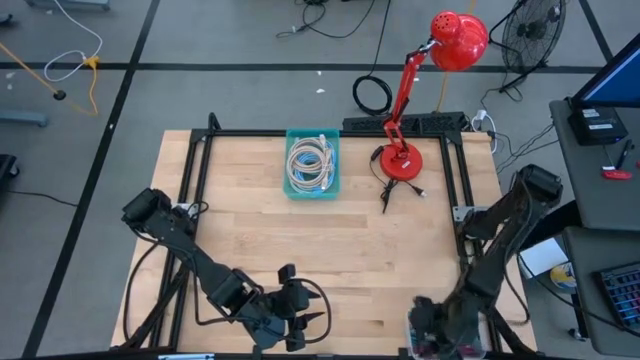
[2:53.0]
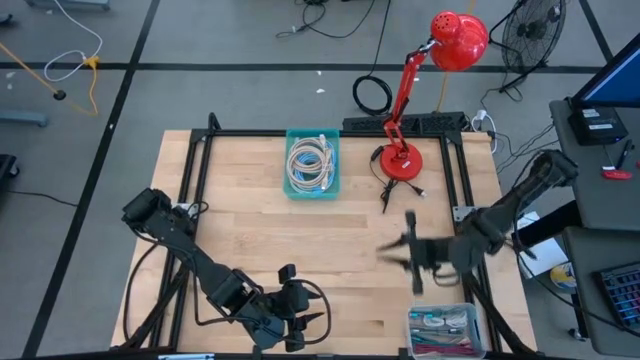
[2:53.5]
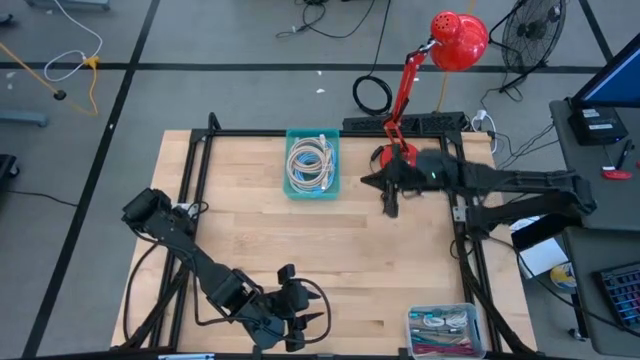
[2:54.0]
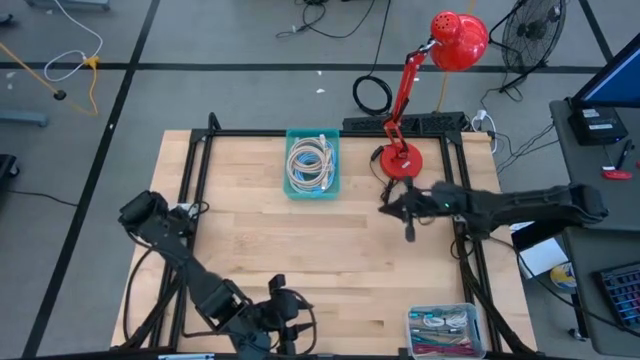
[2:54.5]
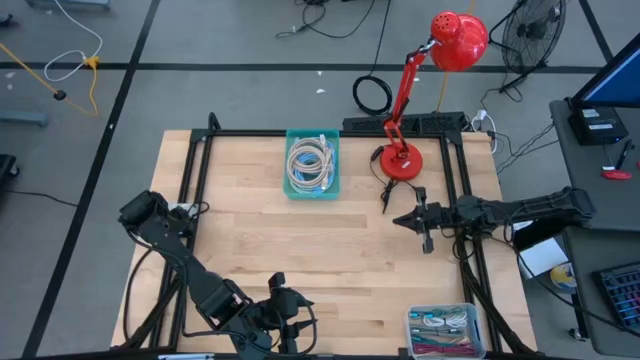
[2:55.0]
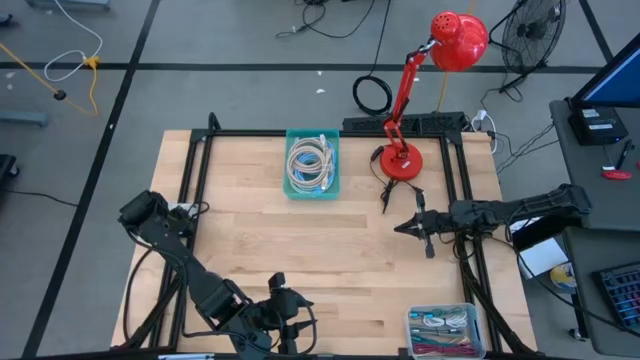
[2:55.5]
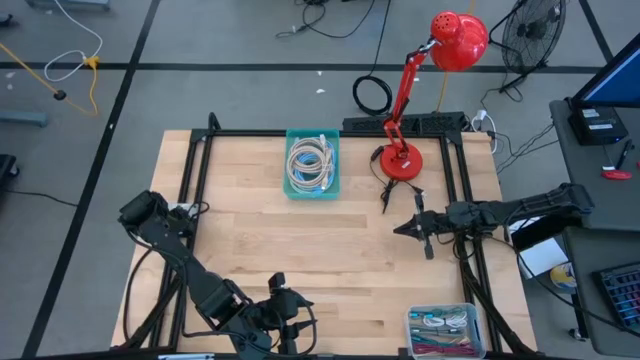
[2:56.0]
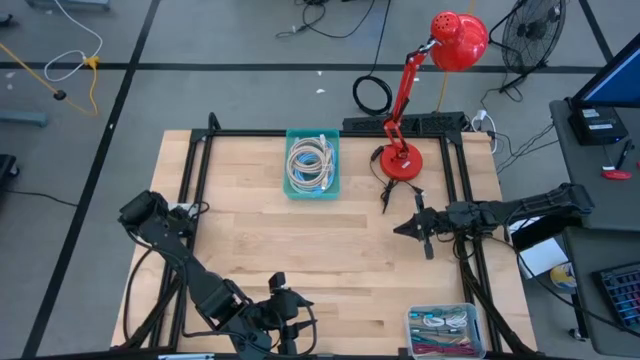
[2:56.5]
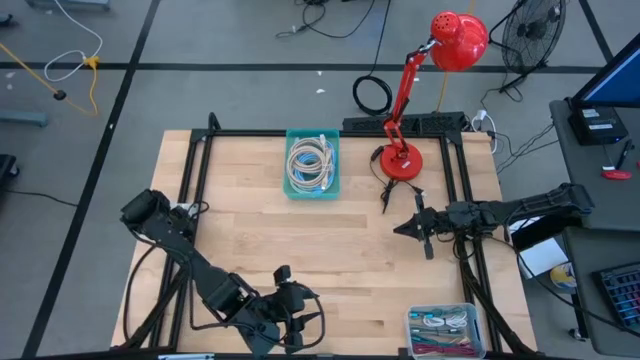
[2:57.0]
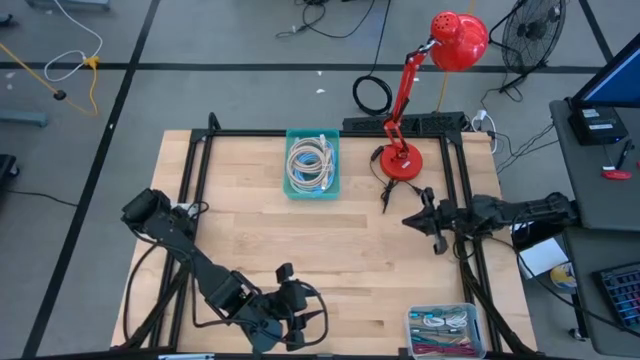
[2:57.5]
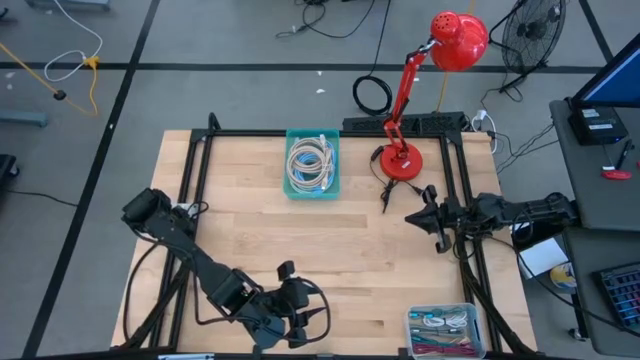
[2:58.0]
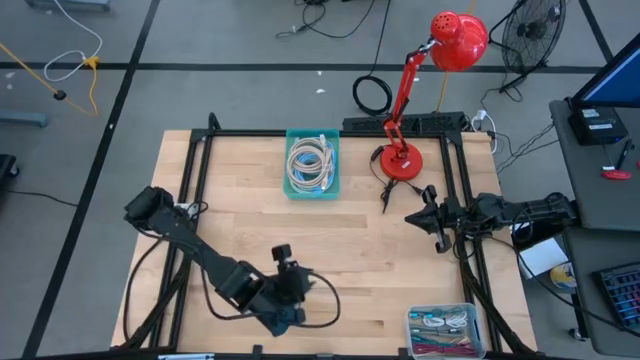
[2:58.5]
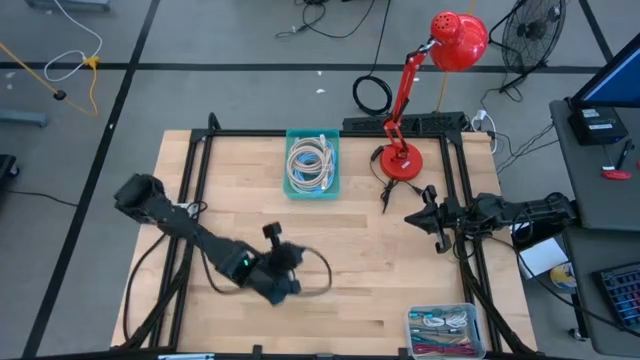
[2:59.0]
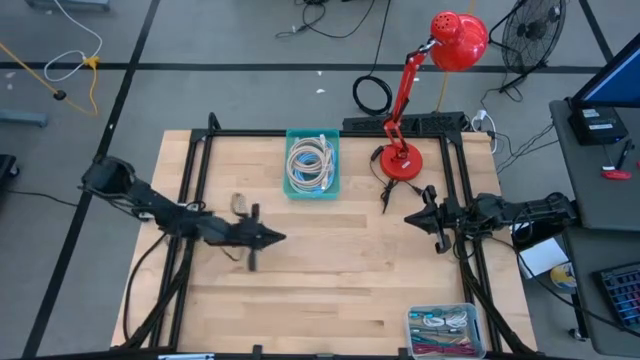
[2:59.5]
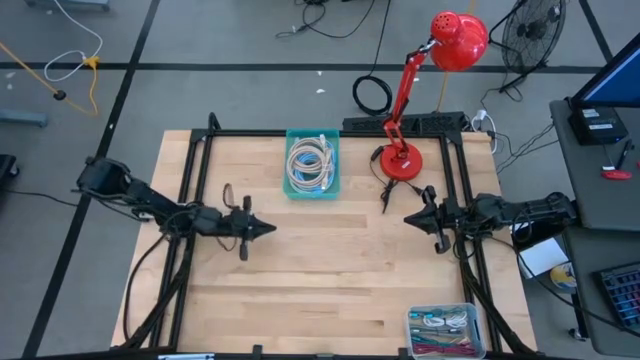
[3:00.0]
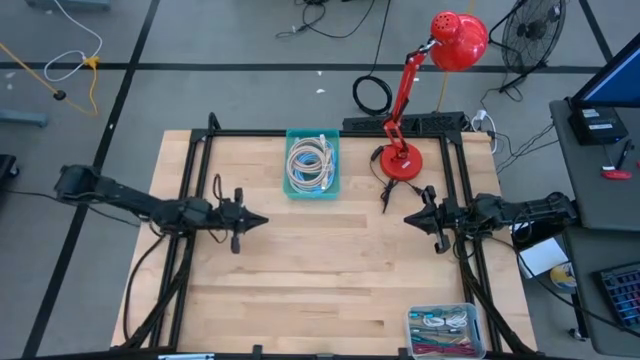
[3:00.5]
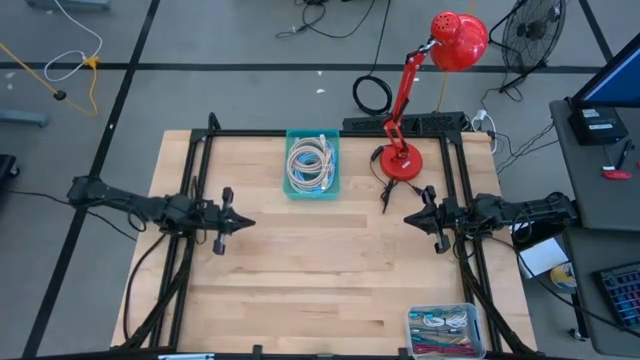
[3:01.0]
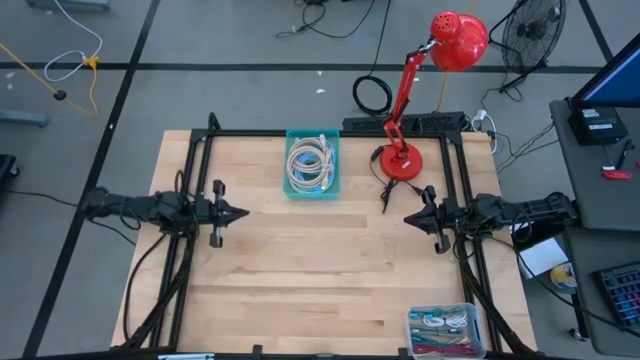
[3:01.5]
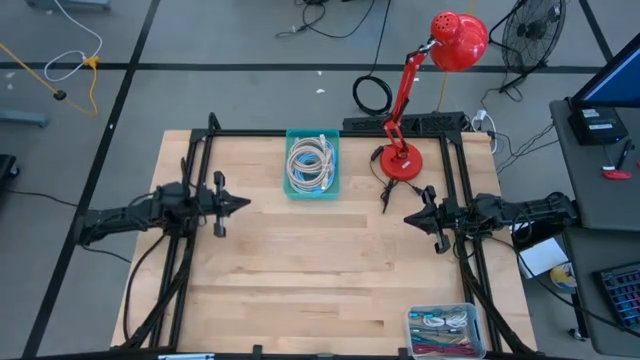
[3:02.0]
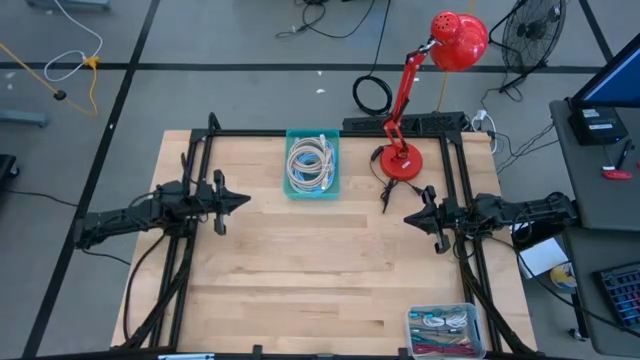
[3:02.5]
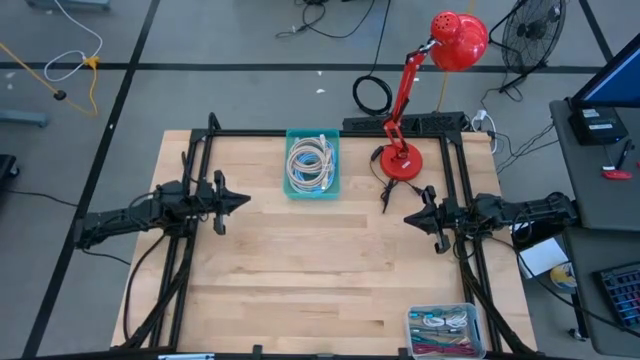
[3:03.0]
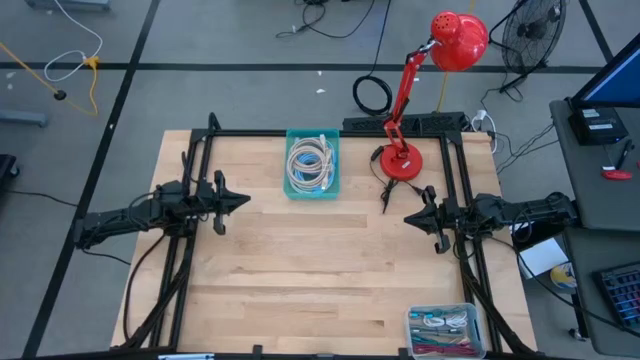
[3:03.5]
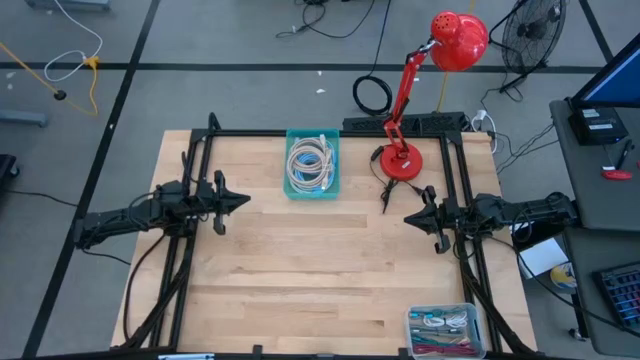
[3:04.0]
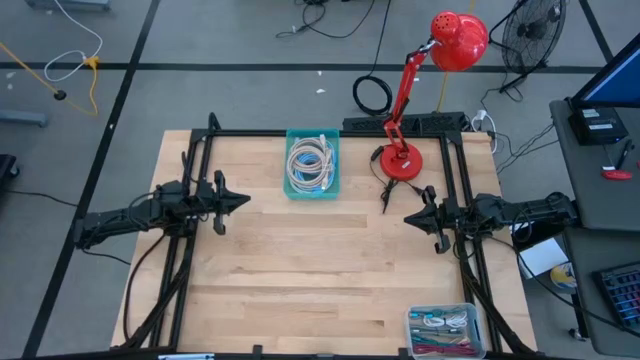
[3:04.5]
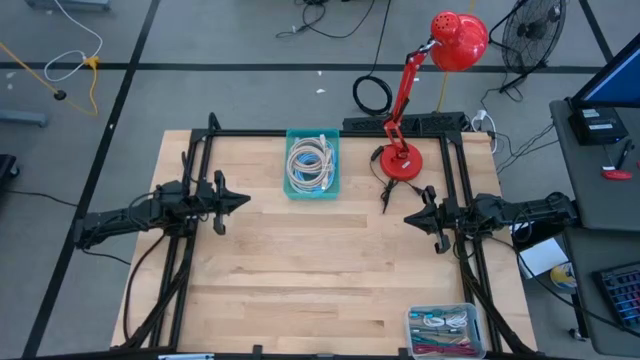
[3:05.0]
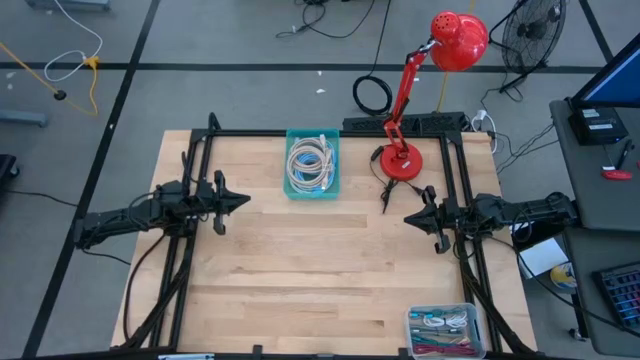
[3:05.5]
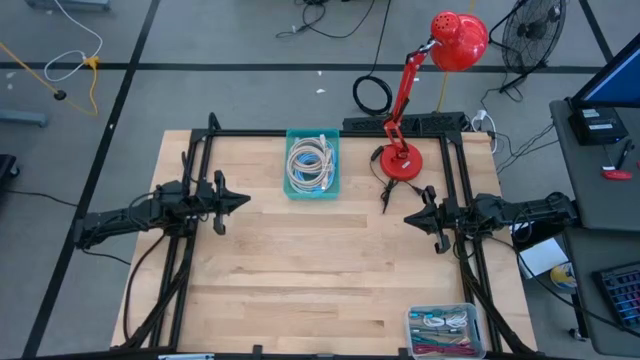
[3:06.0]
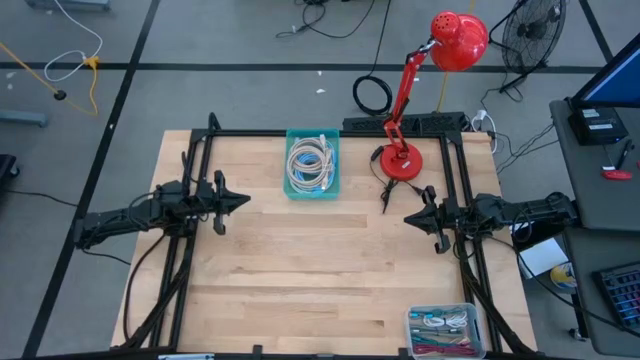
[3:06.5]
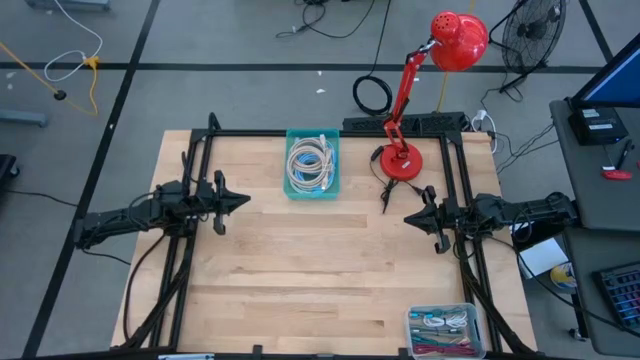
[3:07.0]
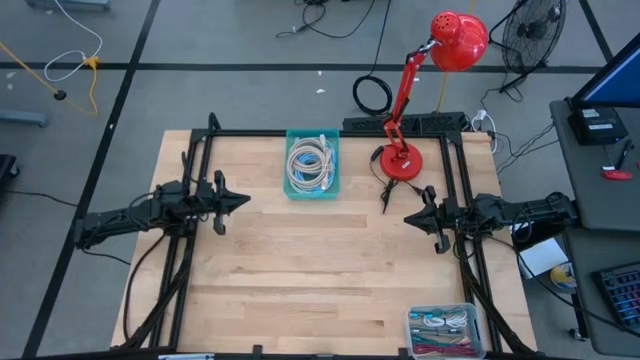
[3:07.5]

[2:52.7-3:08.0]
Task: Pick & Place USB Port
Return To Home Position

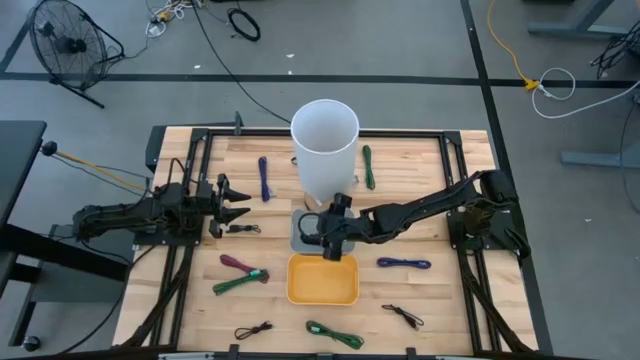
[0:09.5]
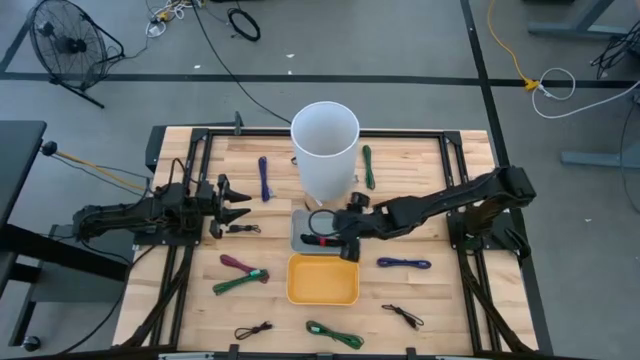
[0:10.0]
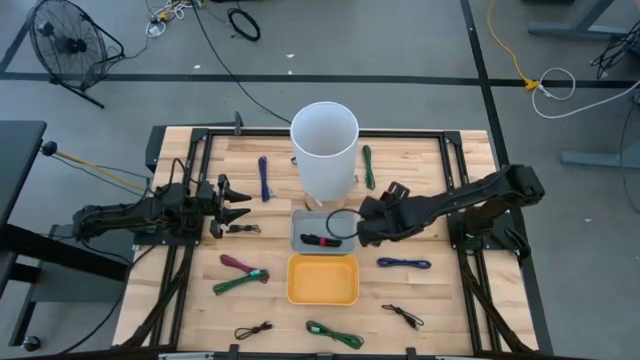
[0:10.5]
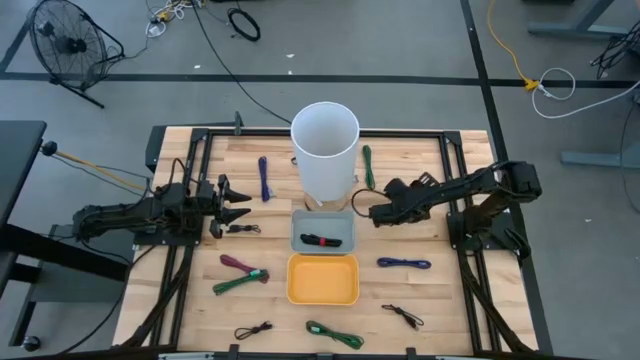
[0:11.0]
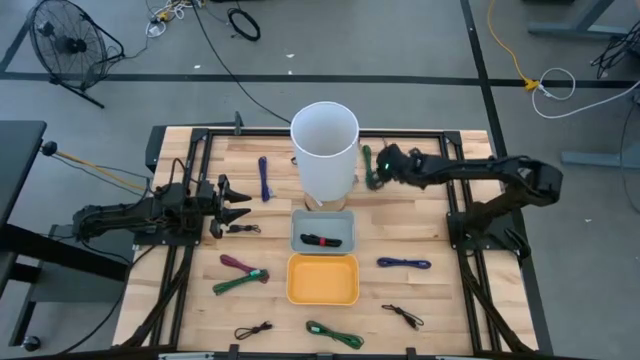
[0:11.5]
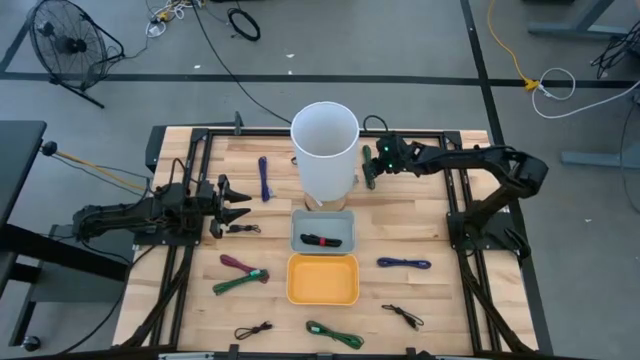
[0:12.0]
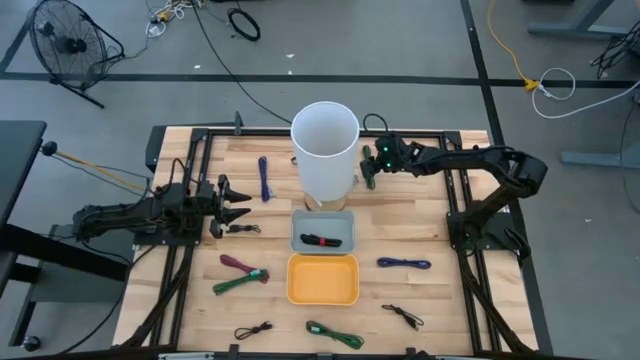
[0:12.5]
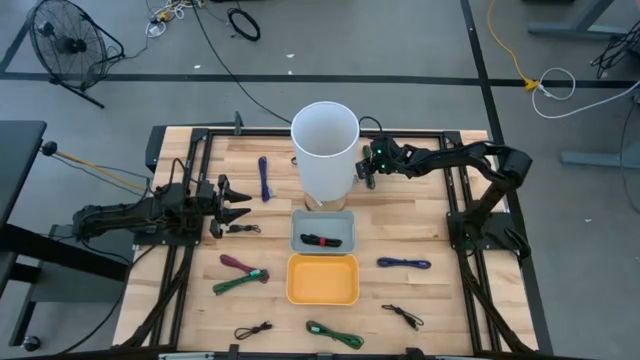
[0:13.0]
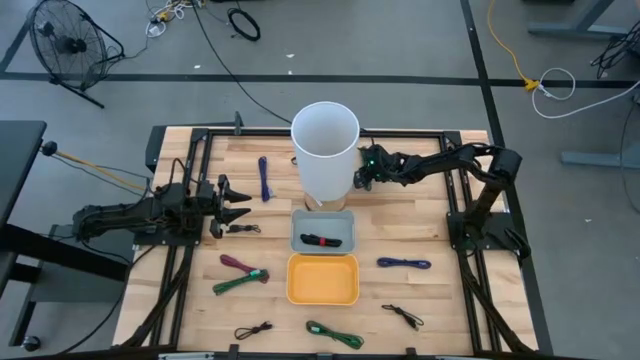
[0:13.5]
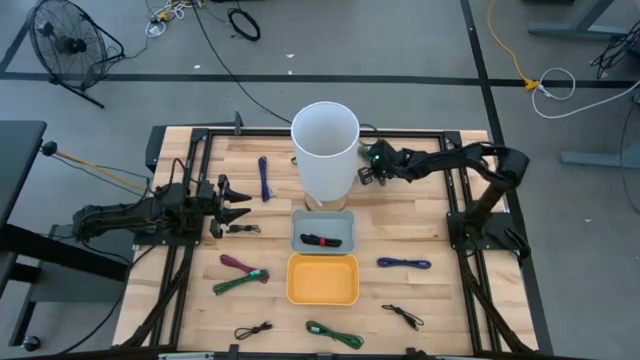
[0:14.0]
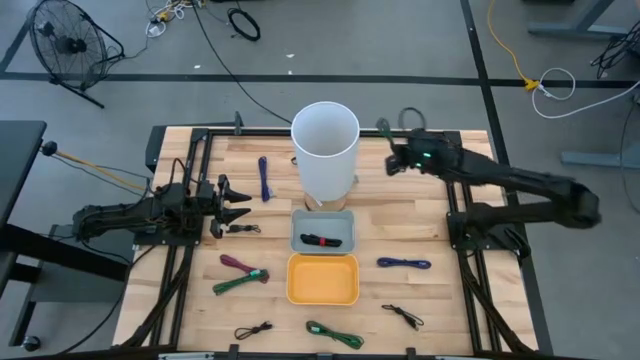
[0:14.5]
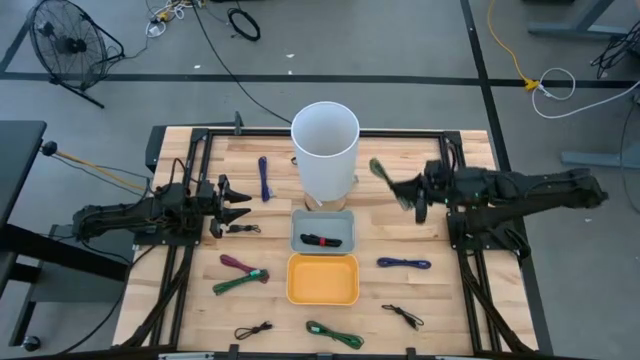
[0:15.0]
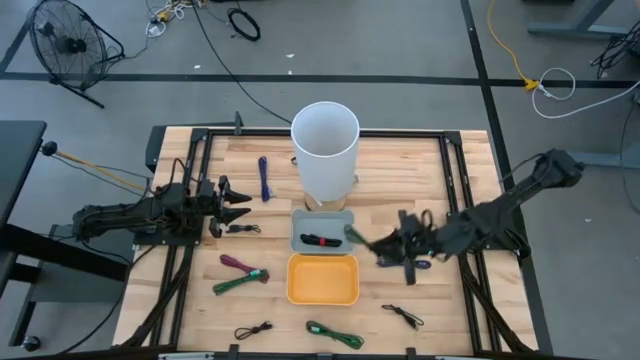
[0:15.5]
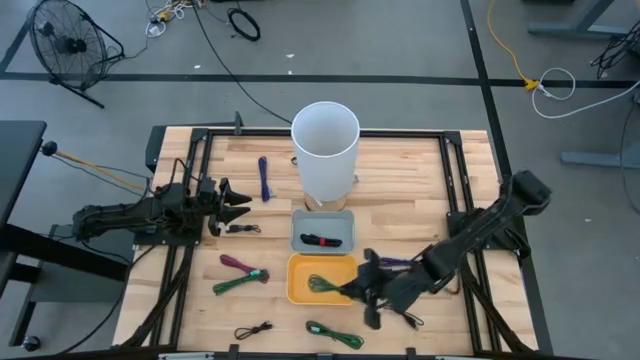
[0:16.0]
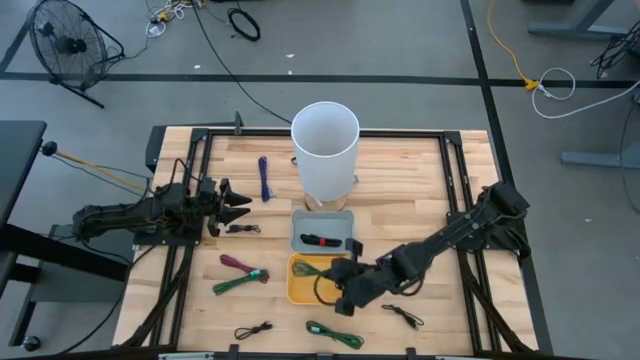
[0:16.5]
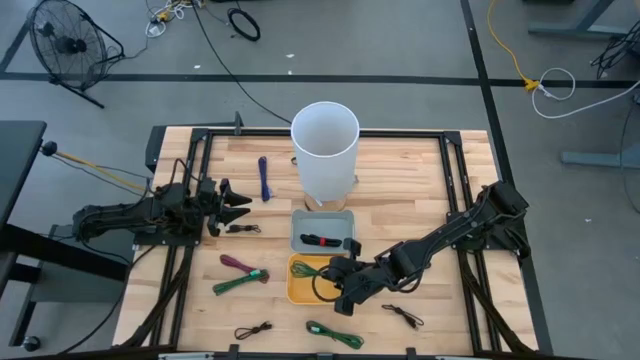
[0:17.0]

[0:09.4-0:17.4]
Task: Pick & Place USB Port
Put the green charger cable into the yellow bin
